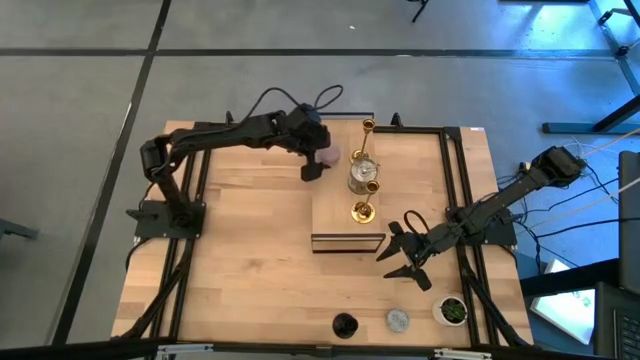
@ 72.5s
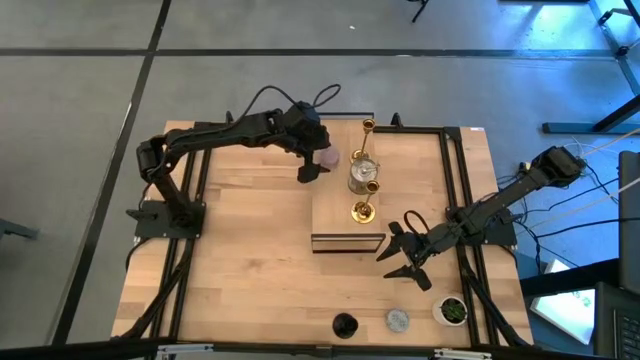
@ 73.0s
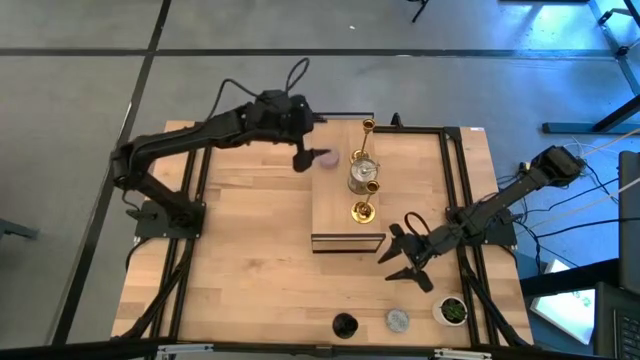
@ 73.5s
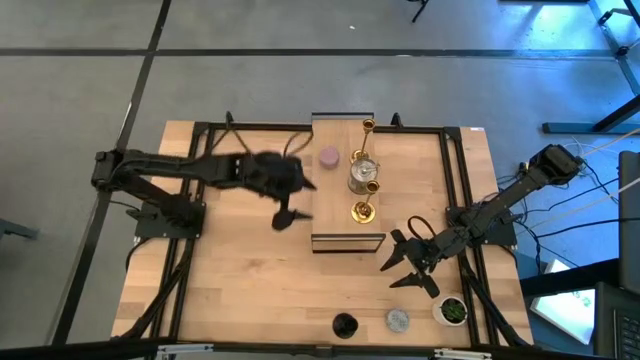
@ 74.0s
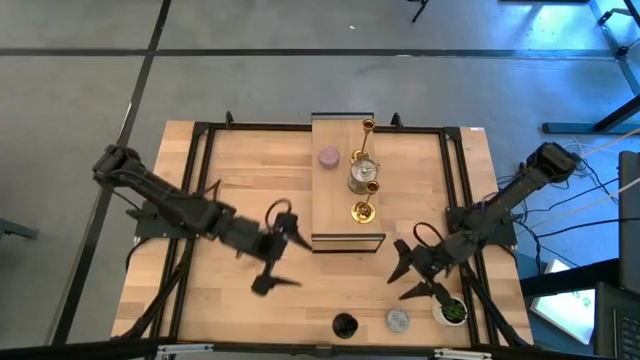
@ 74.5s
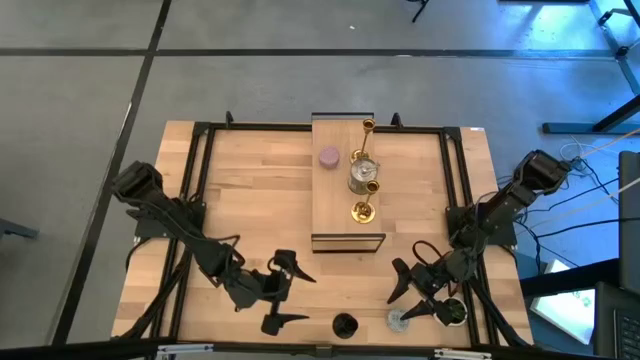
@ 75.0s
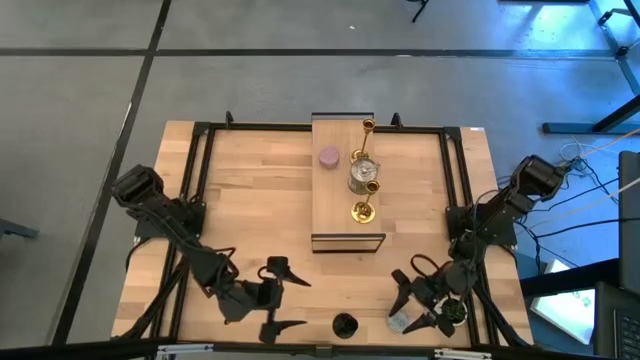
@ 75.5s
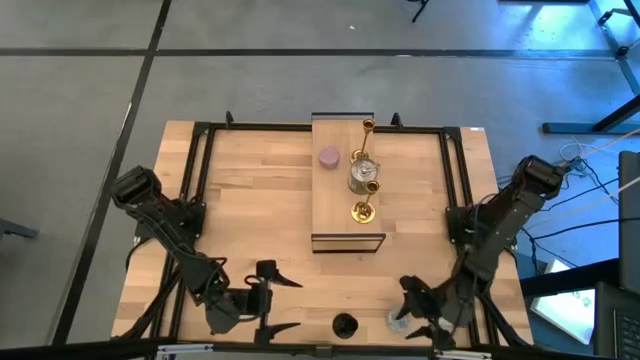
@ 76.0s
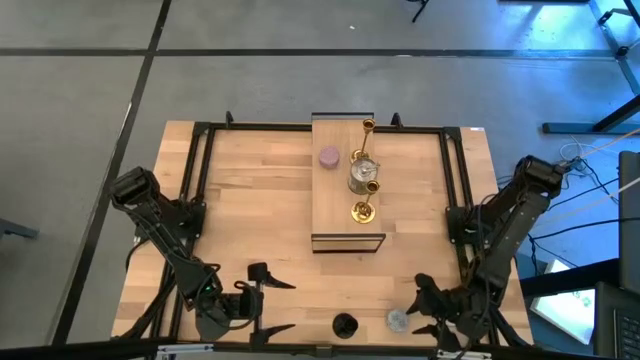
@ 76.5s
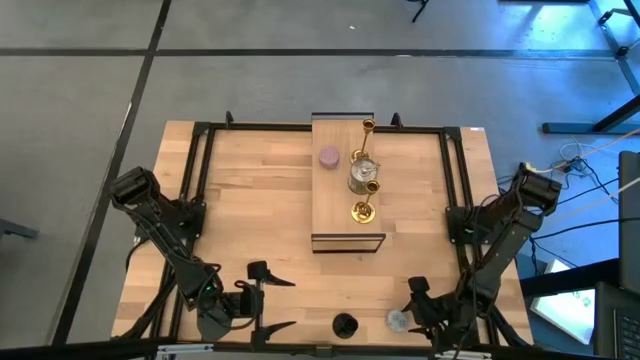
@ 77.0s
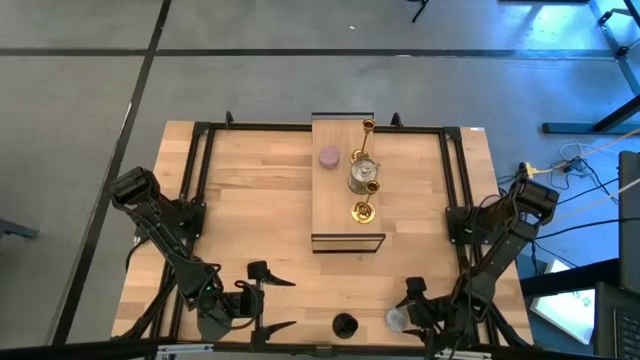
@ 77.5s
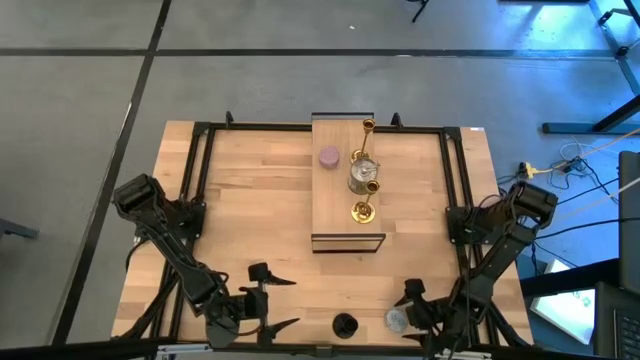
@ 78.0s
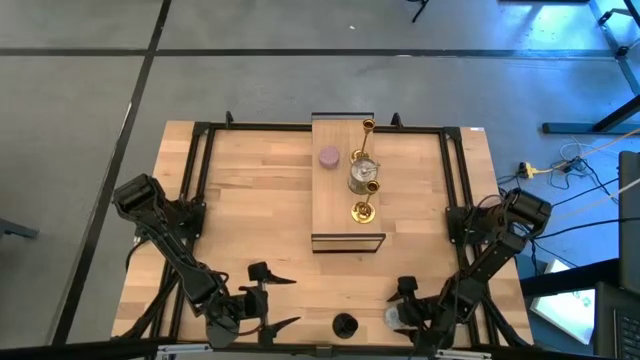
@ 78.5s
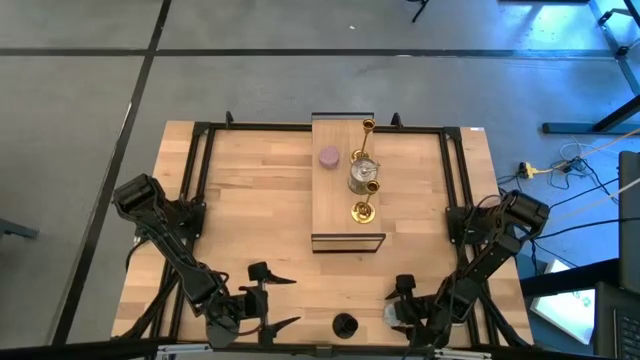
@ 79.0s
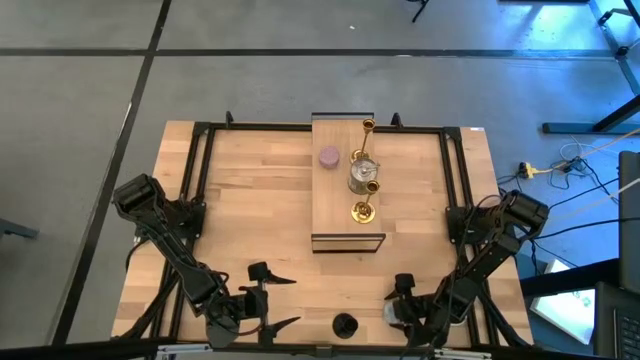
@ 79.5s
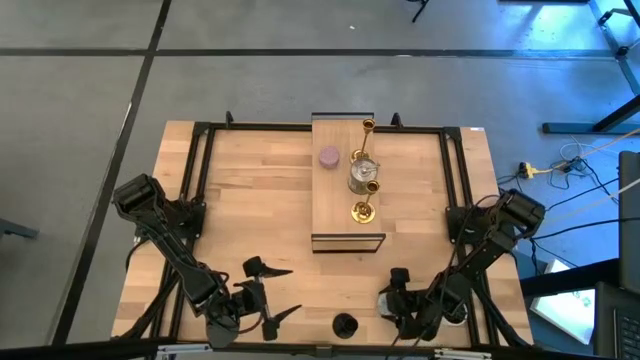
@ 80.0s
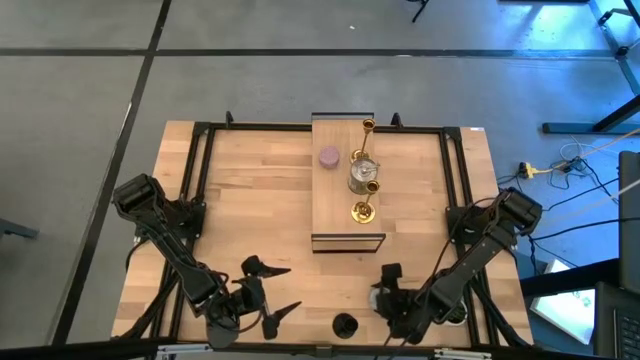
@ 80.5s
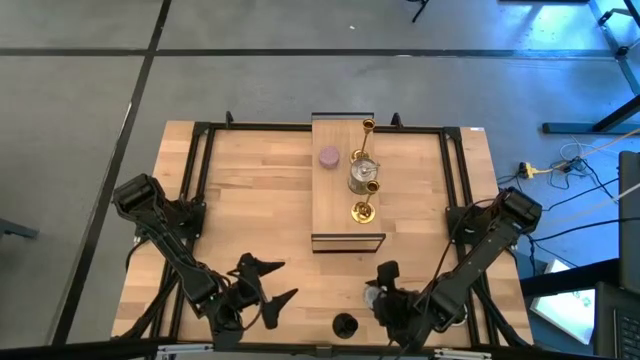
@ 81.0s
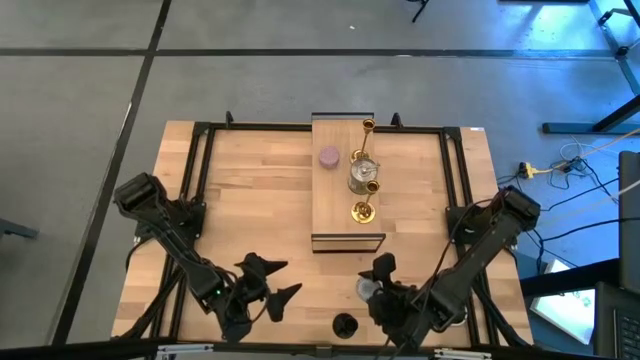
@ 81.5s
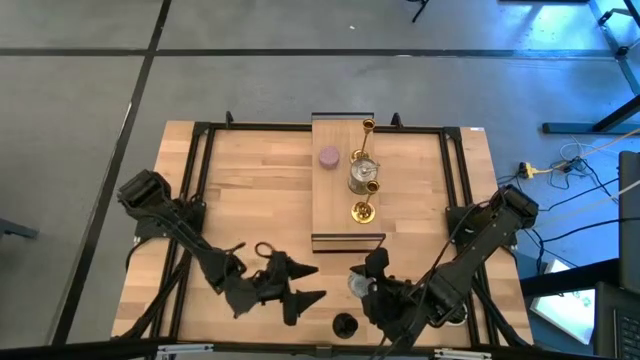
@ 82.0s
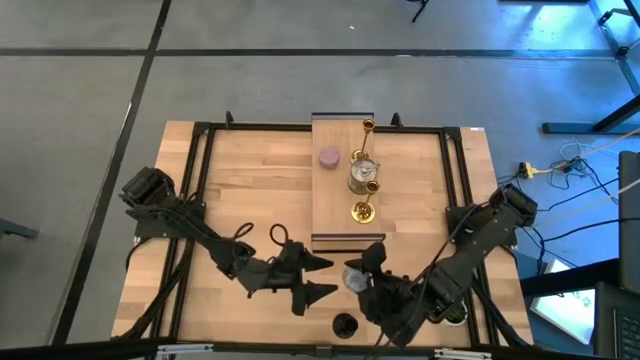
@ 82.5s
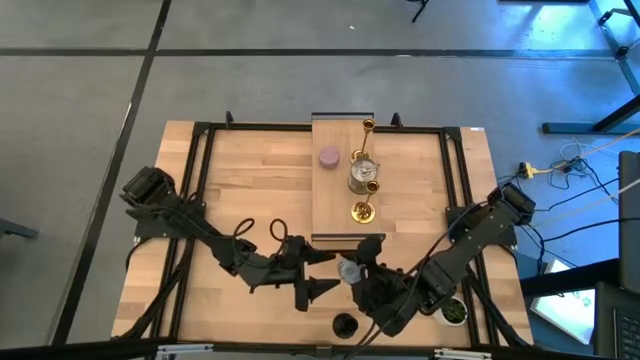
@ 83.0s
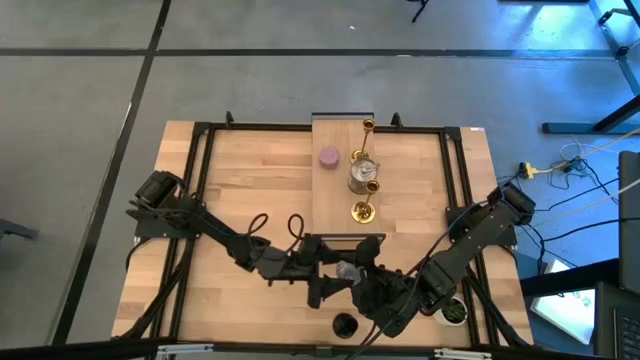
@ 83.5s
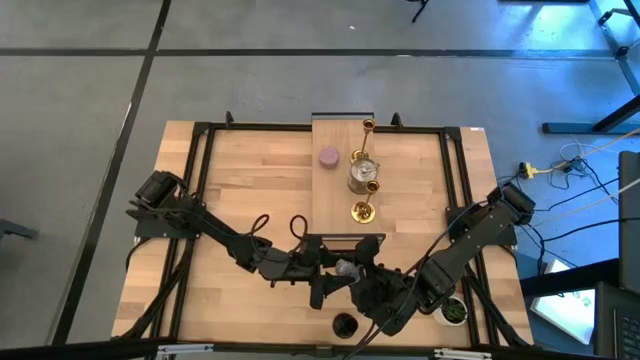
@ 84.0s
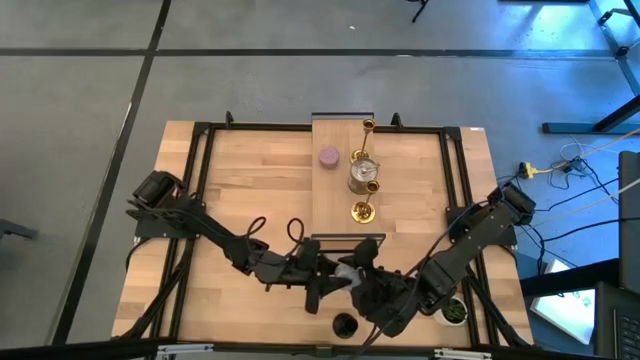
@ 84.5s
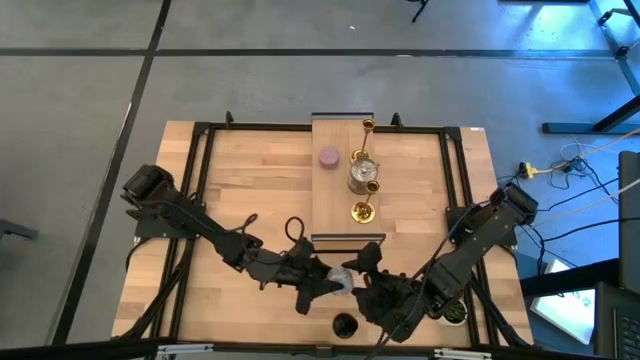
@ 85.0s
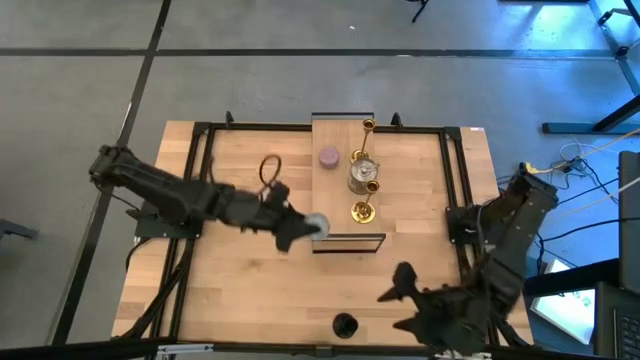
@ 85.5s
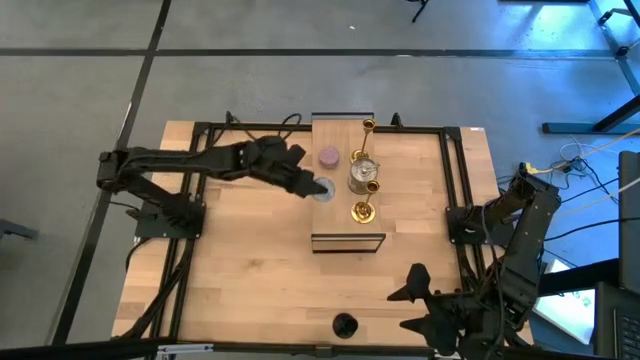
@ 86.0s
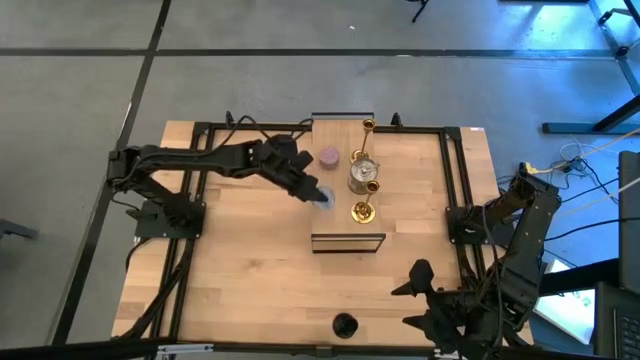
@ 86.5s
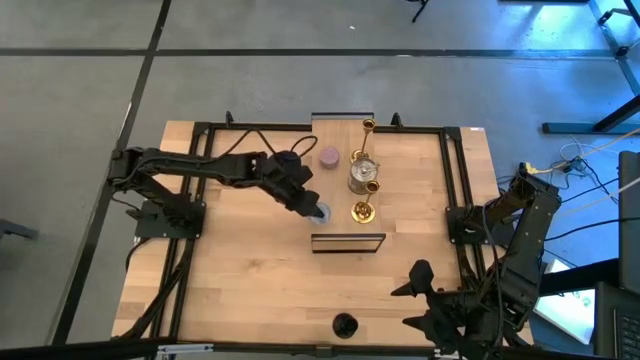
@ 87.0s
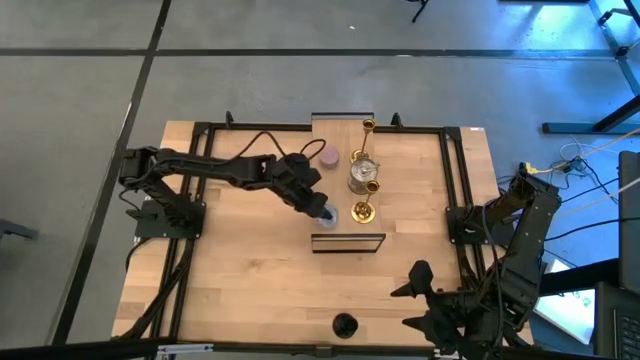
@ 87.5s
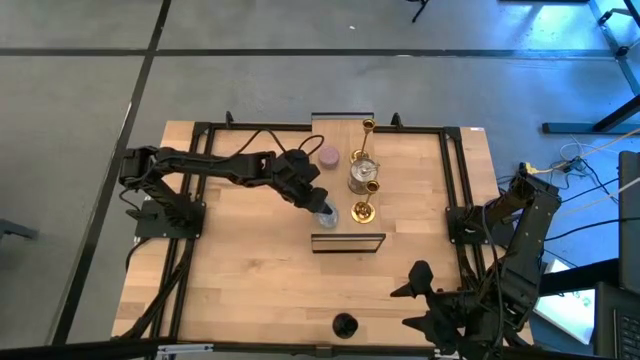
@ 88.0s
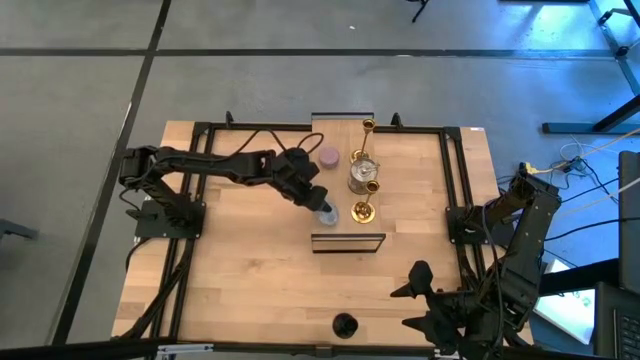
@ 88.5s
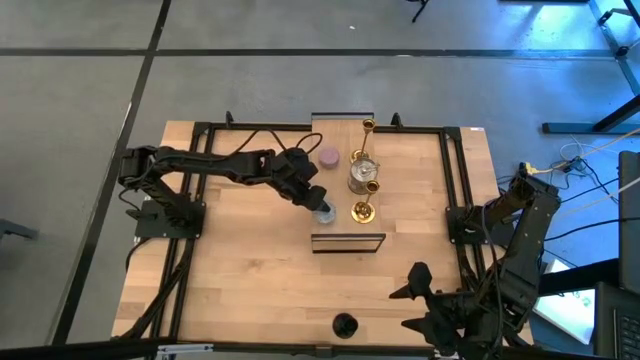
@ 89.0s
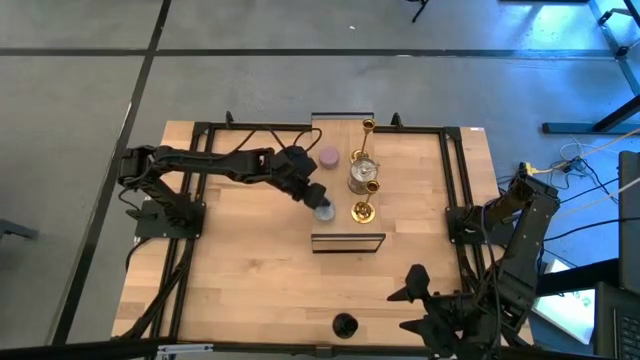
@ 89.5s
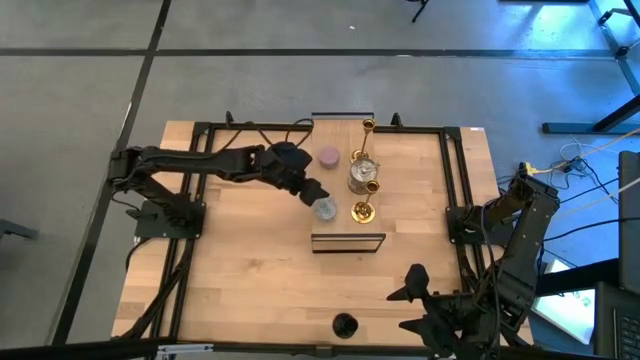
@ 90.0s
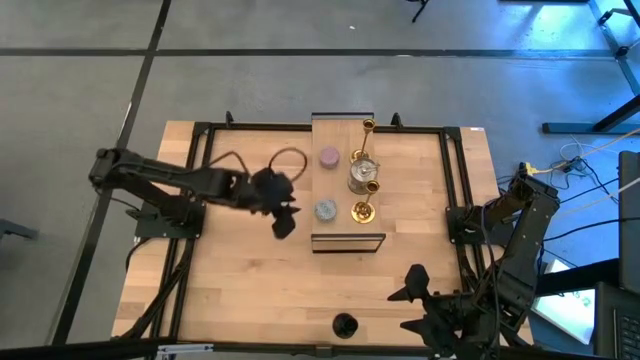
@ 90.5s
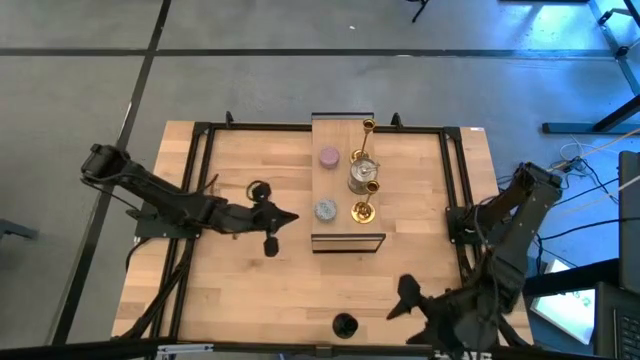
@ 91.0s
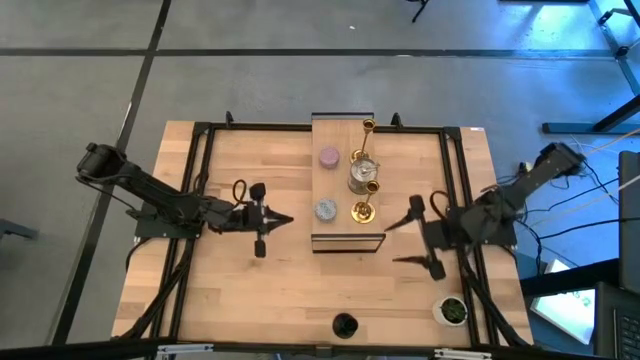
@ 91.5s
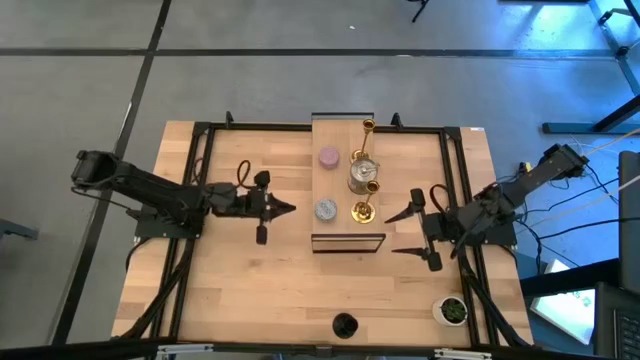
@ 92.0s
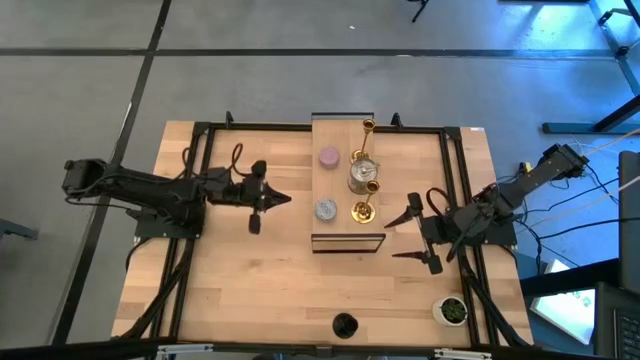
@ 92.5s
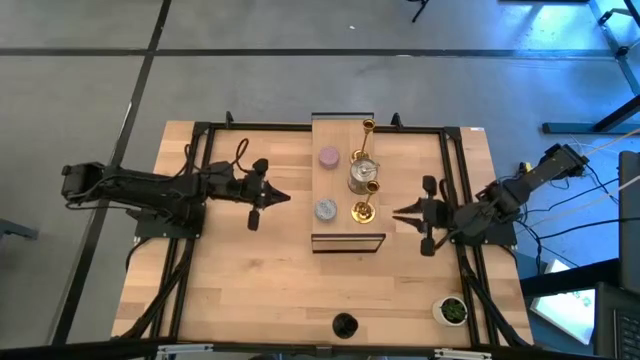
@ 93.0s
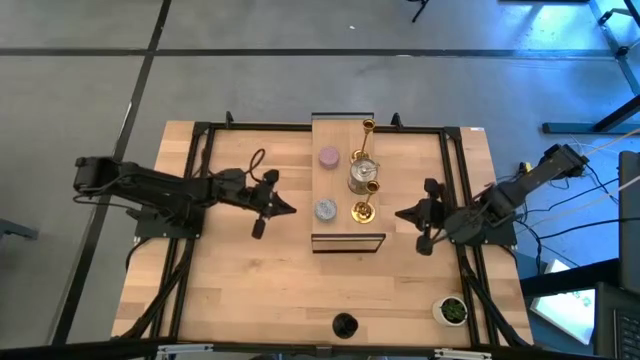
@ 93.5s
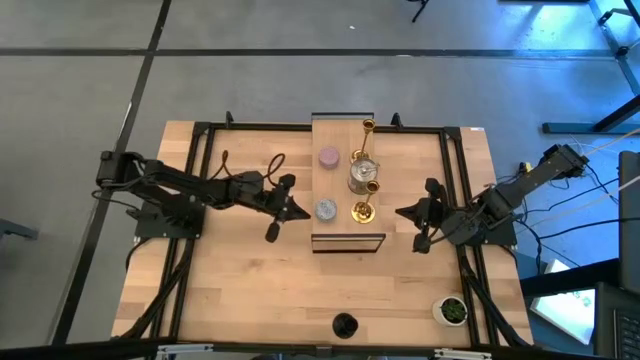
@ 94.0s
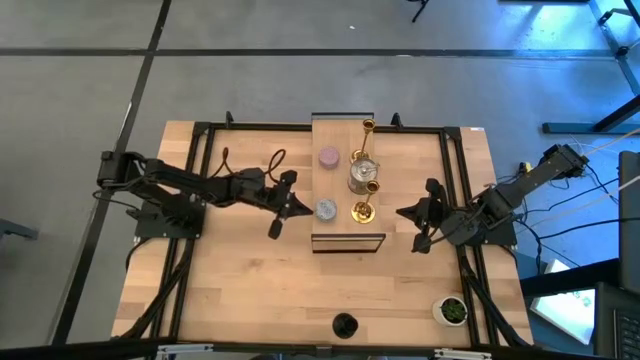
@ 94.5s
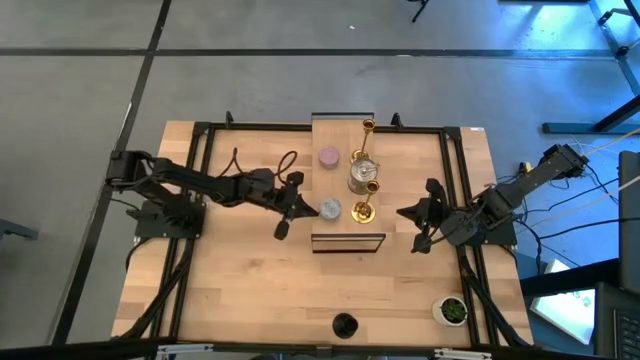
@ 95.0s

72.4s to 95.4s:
Task: Pick & Place candle stick holders
Put the green patterned scented candle on the shelf
